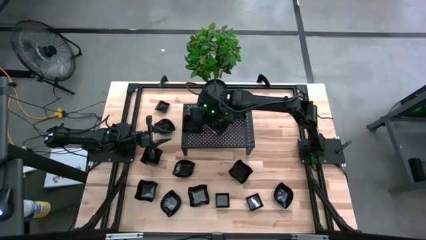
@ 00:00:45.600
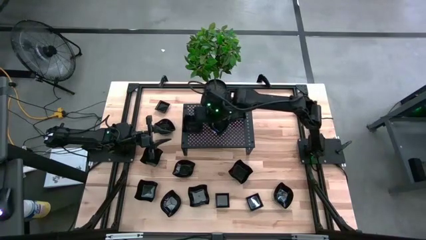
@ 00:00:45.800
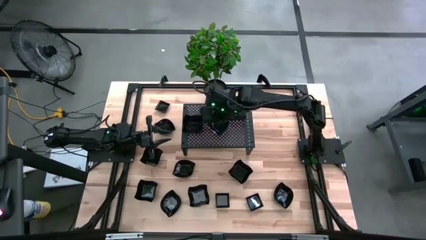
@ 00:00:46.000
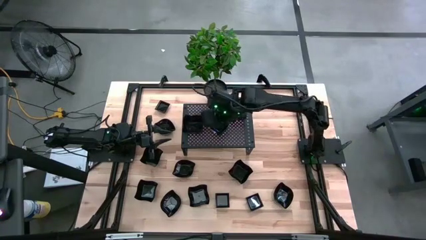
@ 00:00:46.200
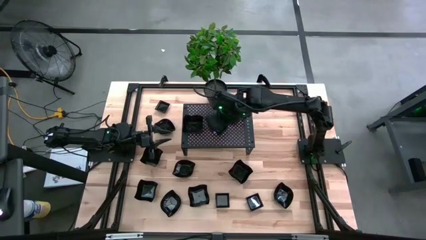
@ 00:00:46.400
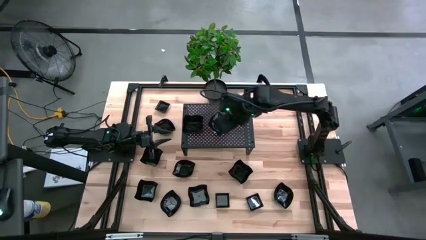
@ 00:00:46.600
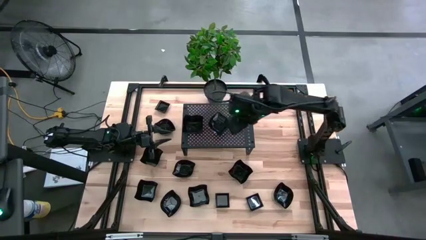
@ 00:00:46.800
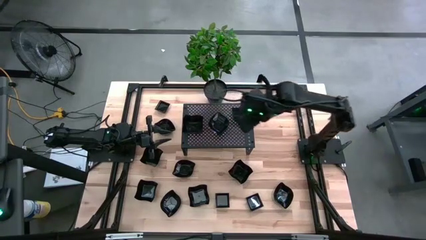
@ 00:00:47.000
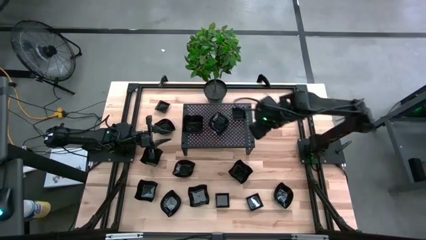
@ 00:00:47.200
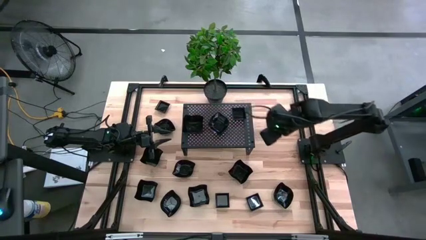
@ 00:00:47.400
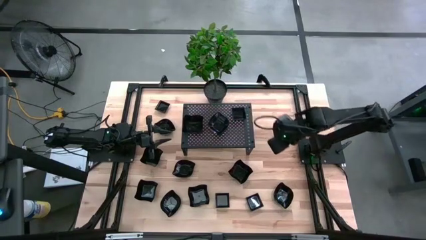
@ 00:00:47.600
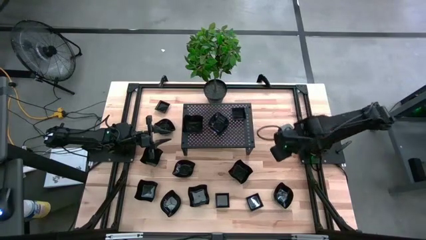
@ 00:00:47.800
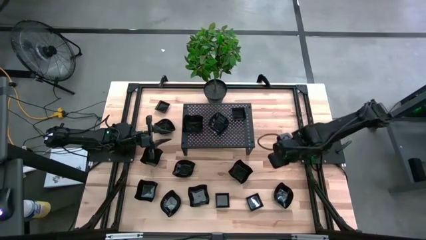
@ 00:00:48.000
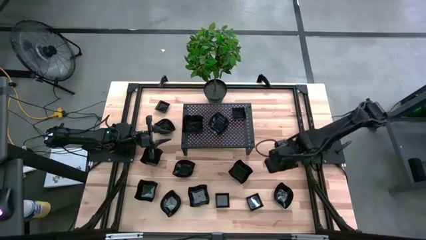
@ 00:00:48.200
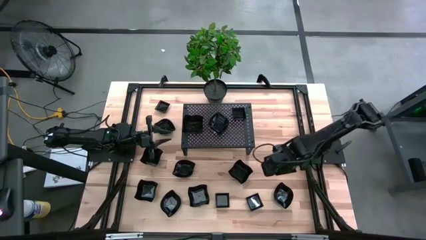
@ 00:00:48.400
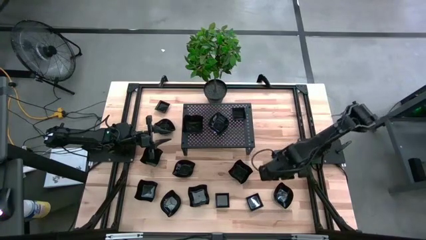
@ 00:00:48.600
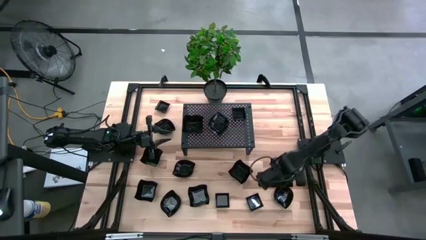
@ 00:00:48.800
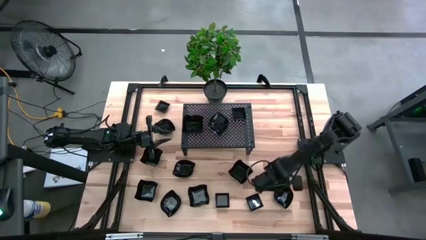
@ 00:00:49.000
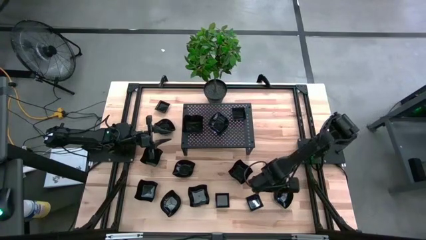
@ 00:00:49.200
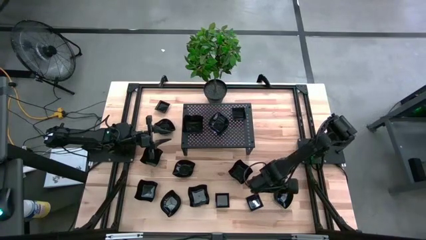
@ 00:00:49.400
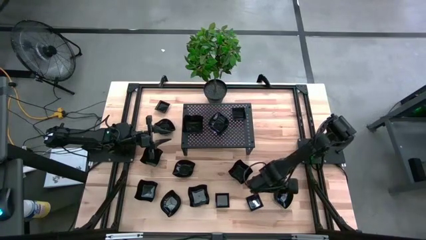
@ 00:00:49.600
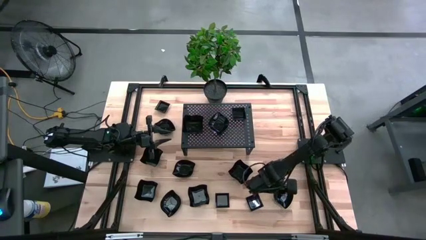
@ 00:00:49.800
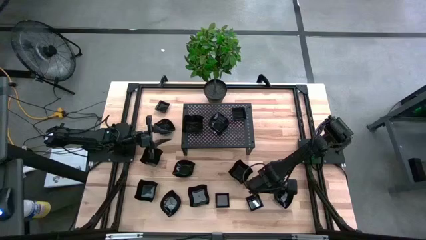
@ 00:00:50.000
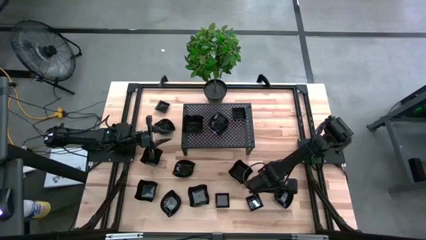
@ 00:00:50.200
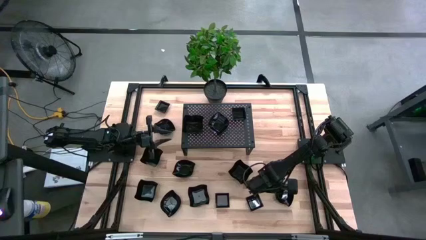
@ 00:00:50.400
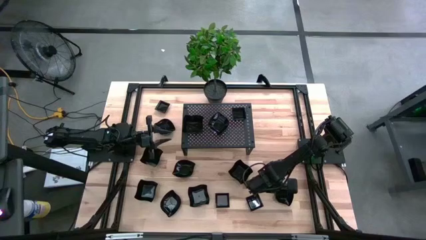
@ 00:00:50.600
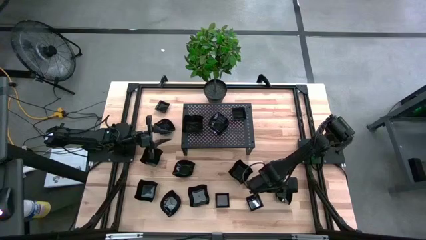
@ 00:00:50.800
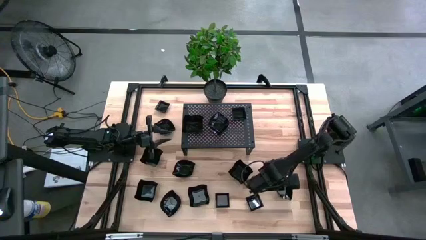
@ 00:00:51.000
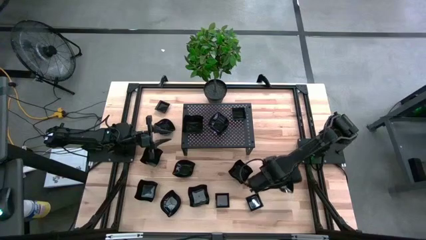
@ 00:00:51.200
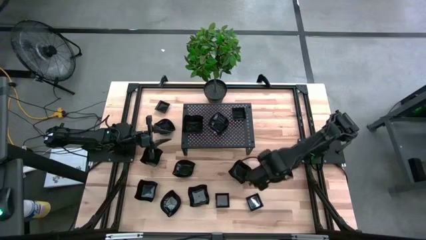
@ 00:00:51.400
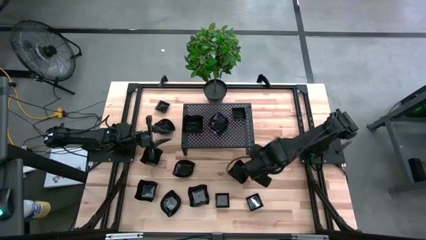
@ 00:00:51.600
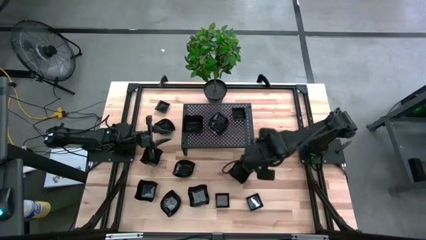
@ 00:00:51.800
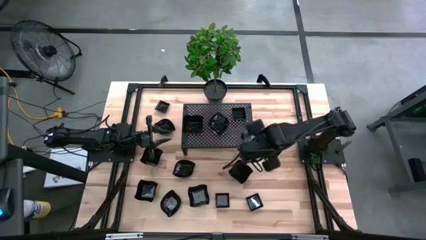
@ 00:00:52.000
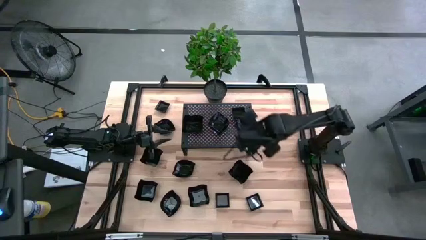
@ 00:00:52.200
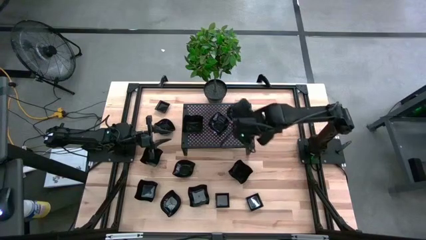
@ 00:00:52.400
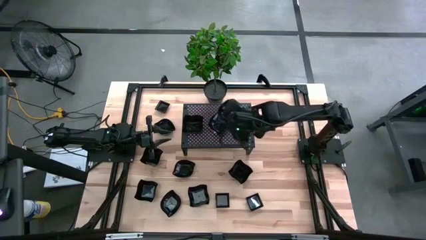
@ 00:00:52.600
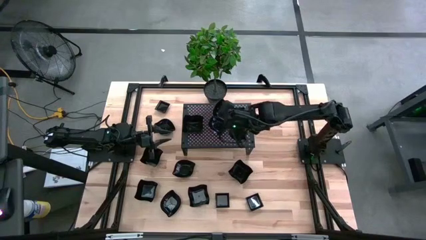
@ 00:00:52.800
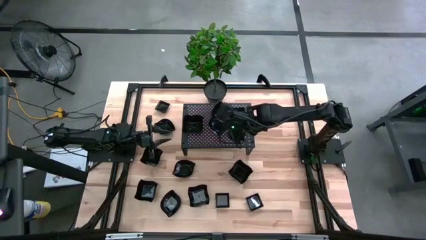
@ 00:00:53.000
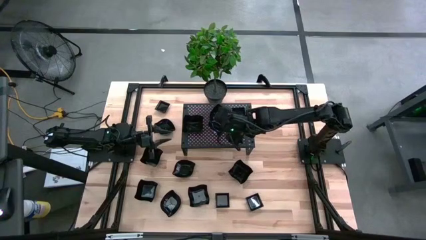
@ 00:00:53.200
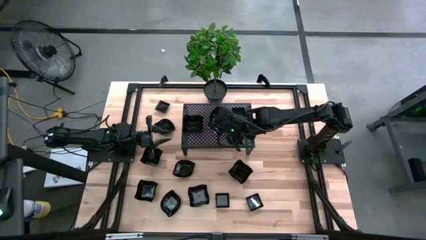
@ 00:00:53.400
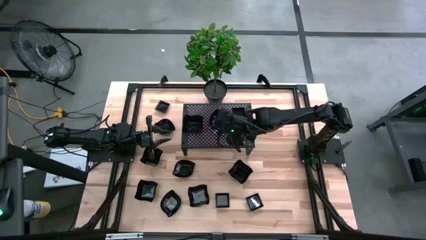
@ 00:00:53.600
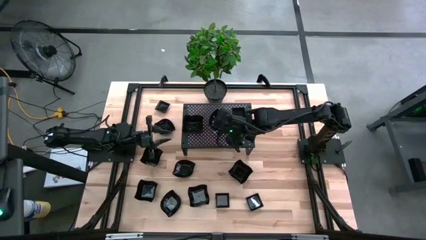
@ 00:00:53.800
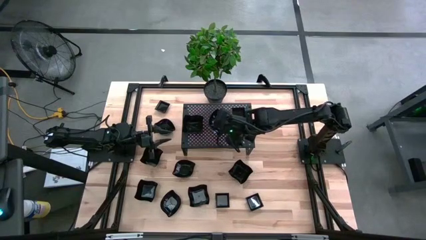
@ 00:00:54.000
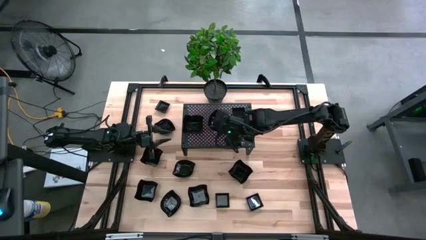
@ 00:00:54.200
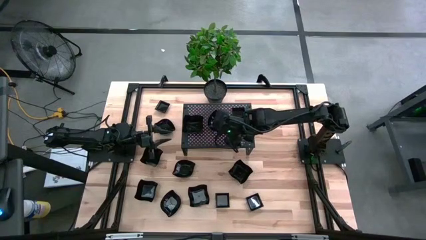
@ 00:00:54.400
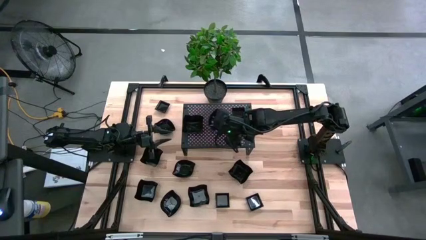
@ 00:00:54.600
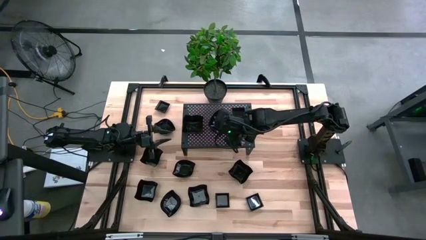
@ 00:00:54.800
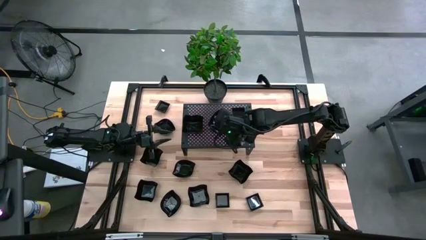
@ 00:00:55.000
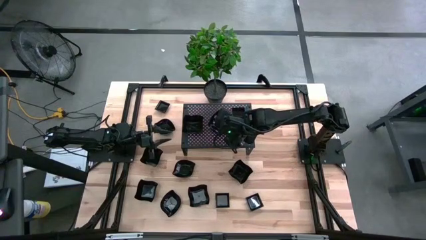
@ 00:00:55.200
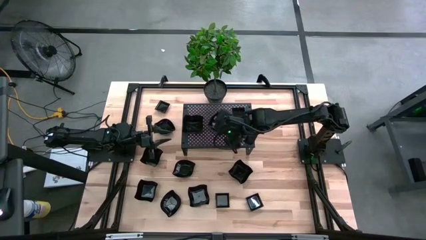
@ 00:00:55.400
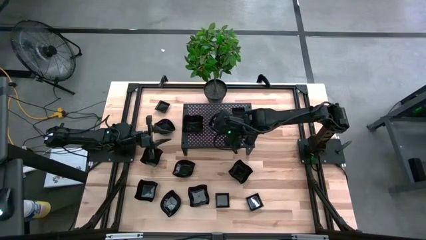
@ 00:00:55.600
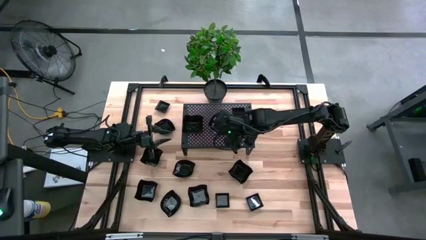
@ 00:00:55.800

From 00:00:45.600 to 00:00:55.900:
Task: Pick & Place Mini shaped plates
Stack the black leaf-shaped plate on top of the other black leaf-shaped plate on the shelf

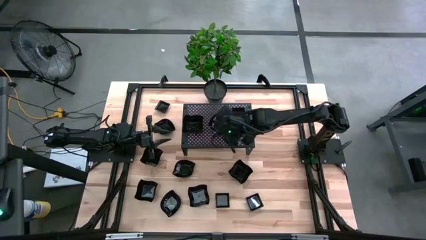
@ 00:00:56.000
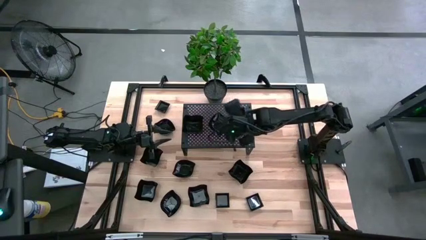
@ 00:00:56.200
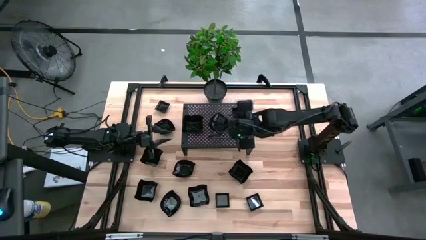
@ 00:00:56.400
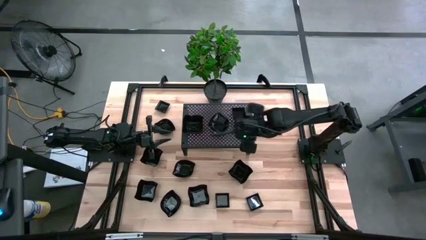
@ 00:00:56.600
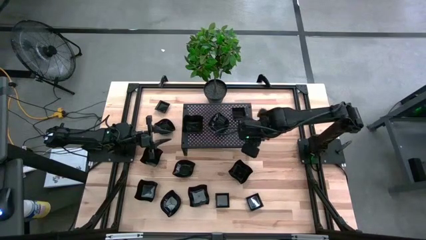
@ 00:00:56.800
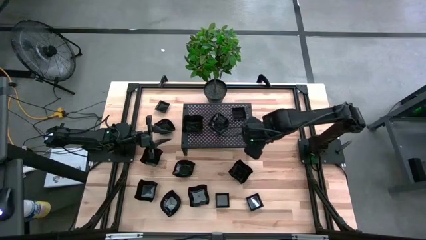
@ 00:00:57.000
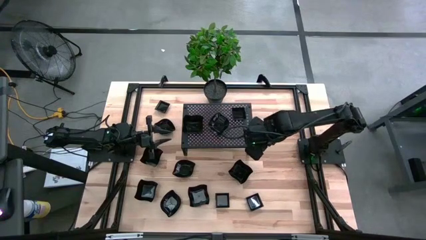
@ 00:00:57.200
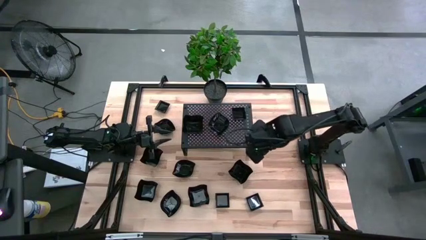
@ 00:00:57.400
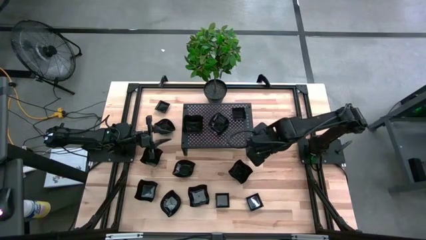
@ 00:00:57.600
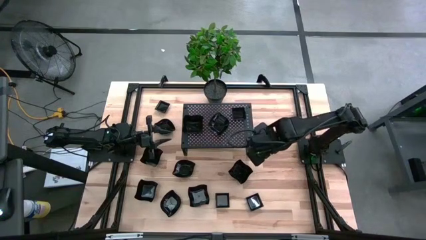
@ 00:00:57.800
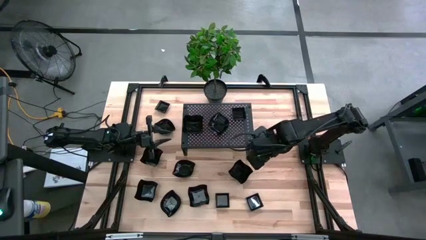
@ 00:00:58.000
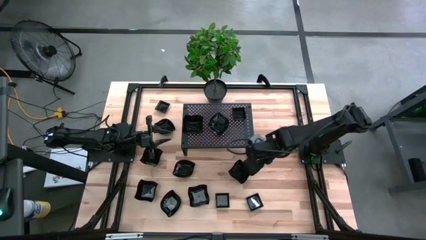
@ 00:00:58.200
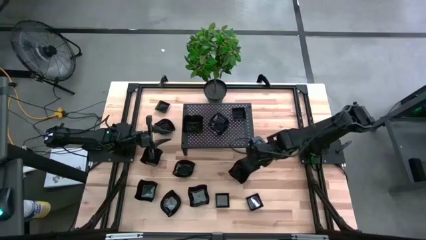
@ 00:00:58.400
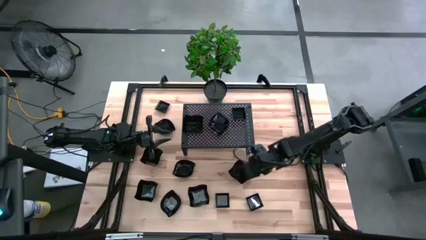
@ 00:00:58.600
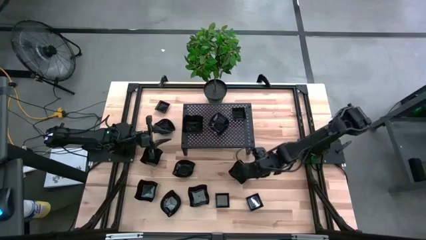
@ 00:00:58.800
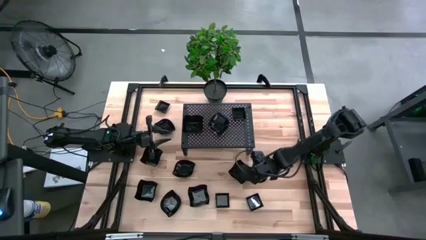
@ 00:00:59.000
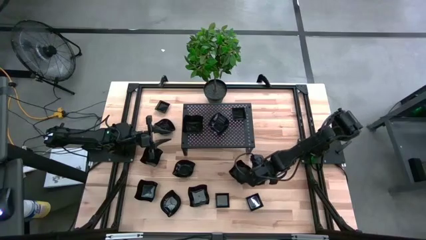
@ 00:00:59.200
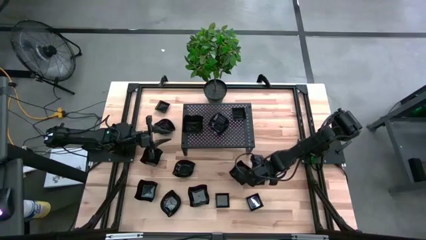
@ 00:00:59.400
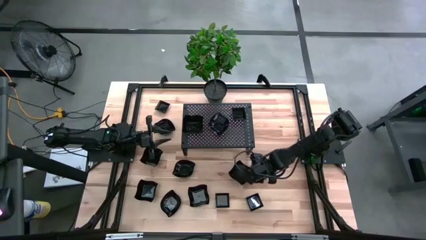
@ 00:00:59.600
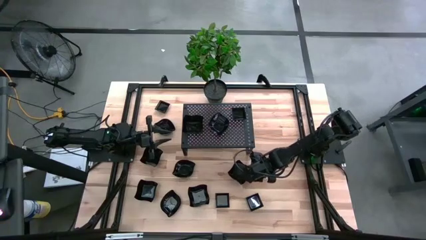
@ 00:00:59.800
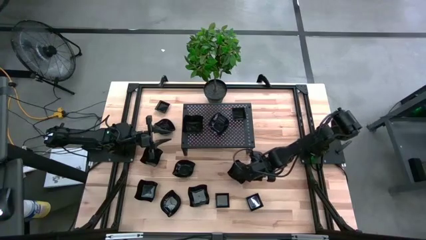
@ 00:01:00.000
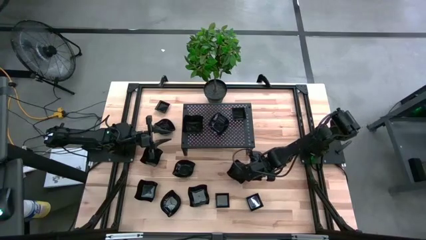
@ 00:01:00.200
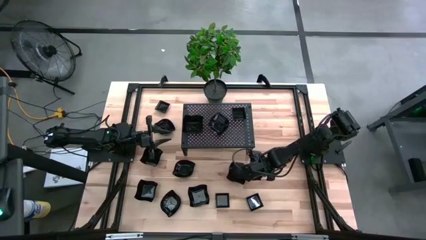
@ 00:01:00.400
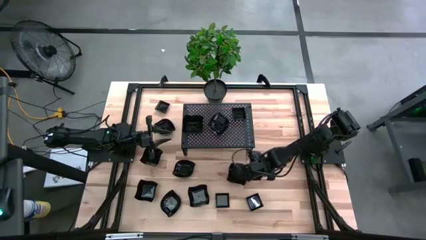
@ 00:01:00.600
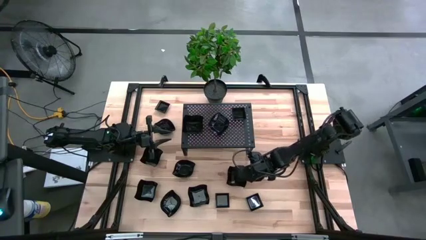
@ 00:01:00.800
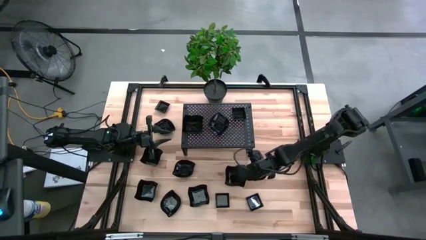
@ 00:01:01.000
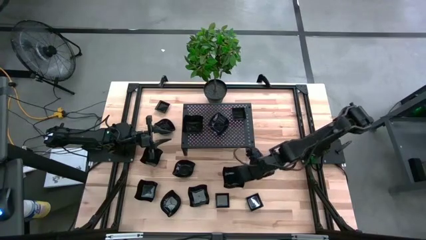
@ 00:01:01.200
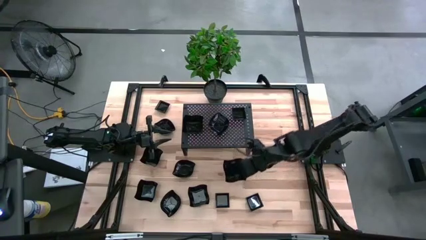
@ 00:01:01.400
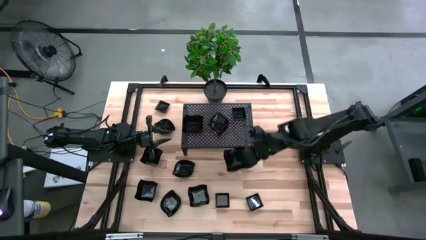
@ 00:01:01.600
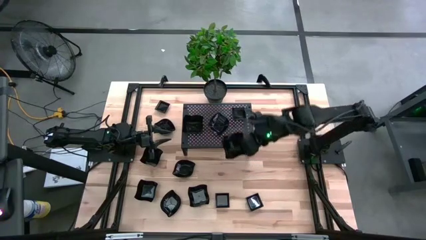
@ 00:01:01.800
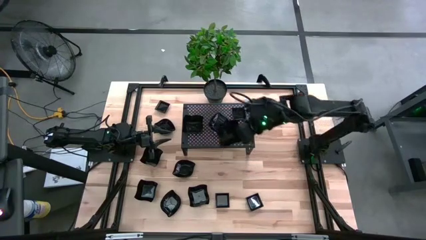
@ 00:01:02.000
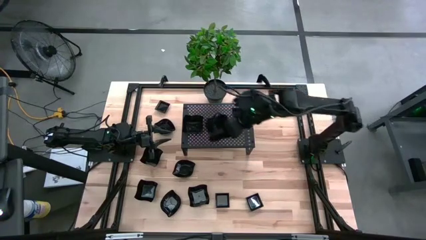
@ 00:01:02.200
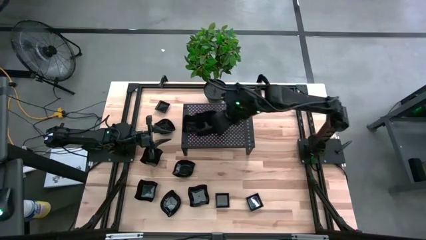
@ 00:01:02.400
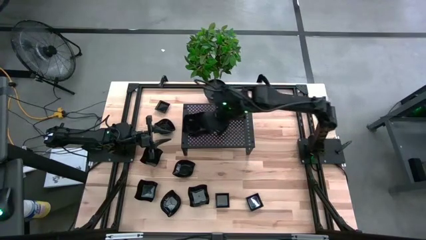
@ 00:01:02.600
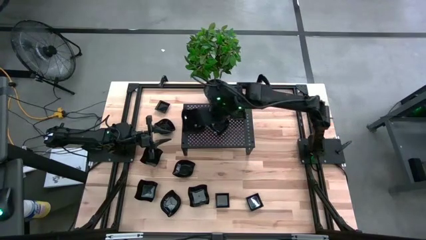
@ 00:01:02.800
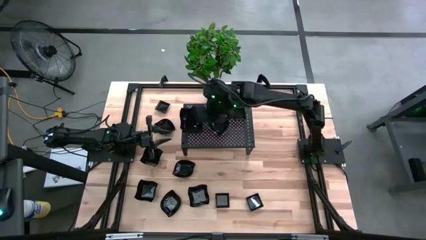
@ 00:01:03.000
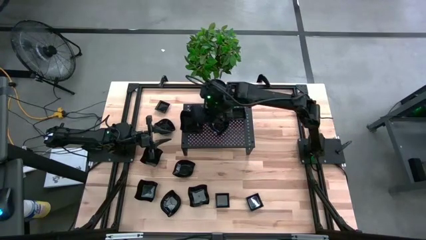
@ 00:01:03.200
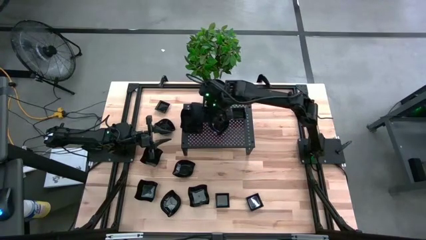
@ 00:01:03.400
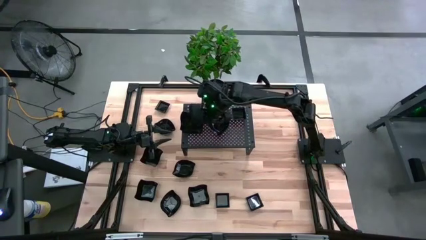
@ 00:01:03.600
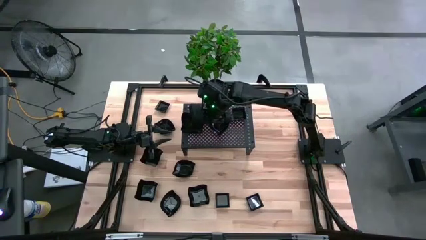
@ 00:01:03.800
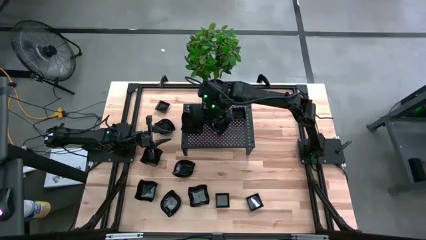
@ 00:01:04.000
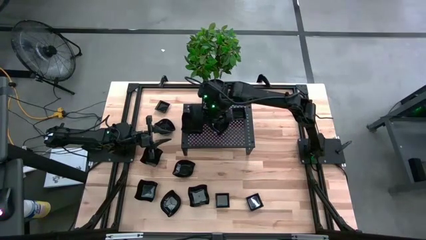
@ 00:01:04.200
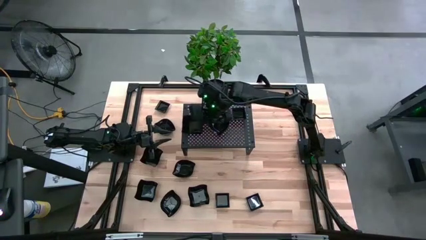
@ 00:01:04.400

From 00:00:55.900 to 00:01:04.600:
Stack the black distorted square plate on top of the other black distorted square plate on the shelf
